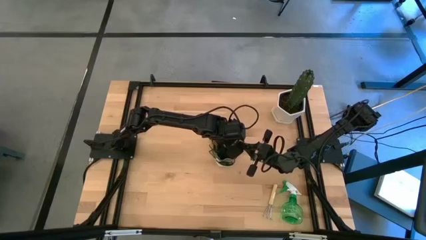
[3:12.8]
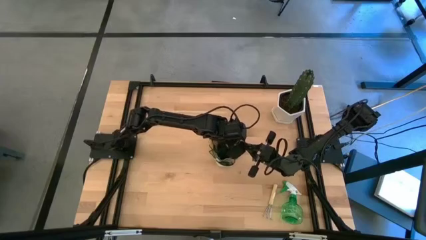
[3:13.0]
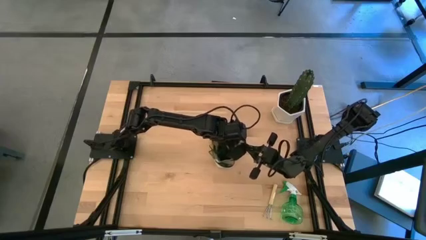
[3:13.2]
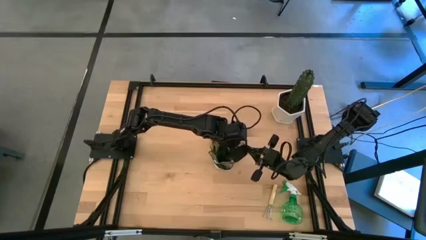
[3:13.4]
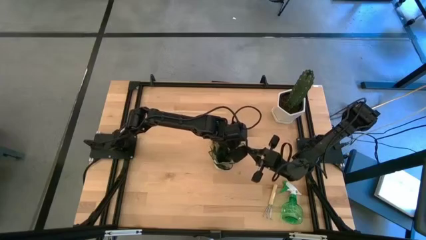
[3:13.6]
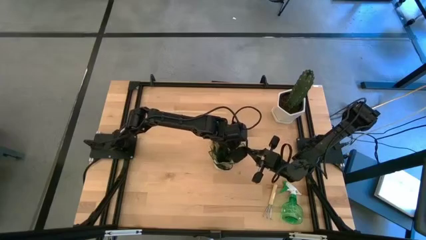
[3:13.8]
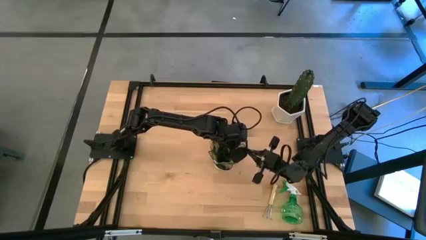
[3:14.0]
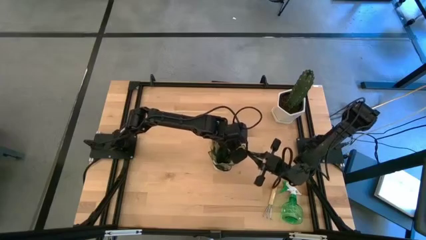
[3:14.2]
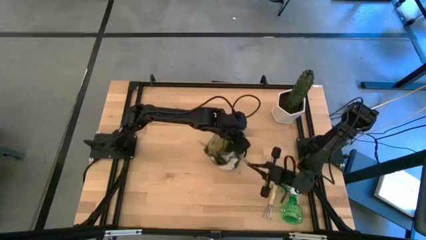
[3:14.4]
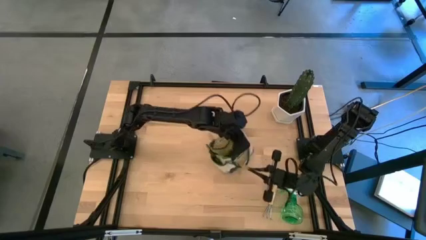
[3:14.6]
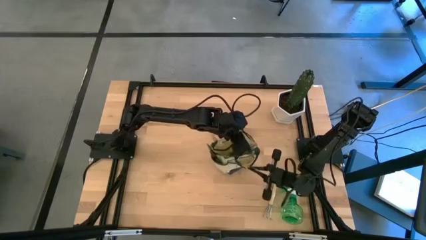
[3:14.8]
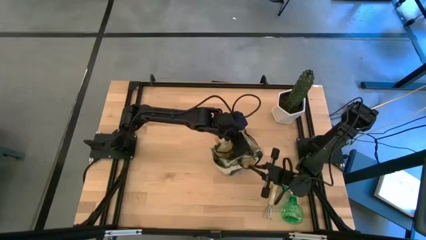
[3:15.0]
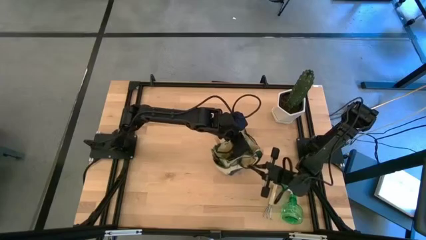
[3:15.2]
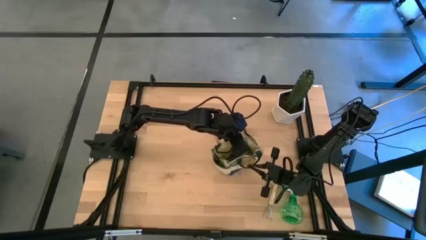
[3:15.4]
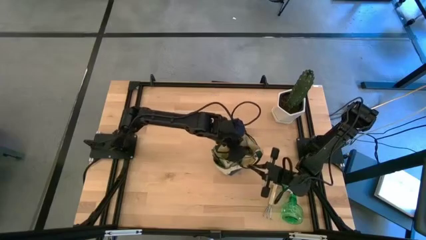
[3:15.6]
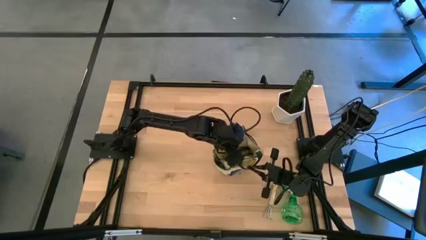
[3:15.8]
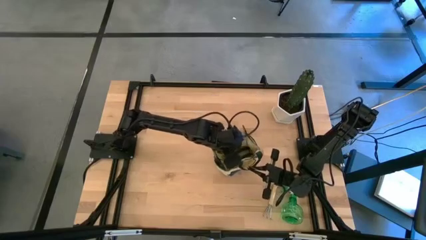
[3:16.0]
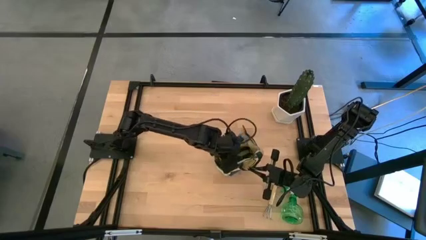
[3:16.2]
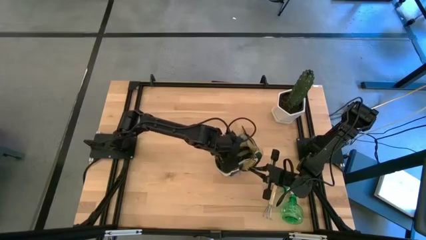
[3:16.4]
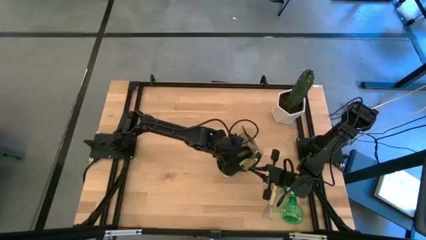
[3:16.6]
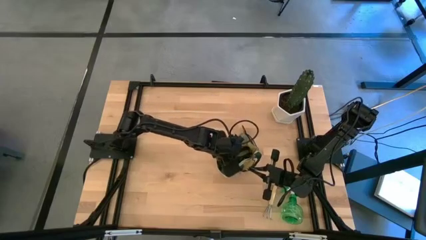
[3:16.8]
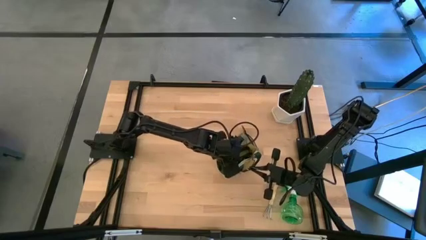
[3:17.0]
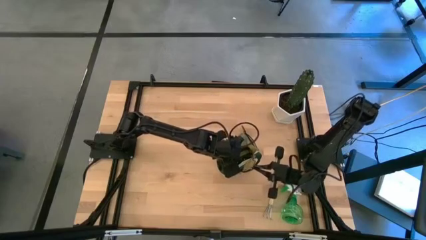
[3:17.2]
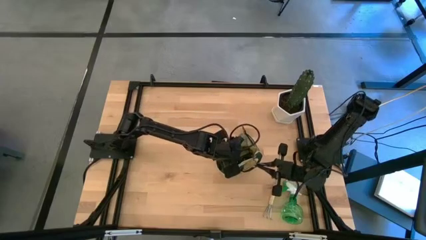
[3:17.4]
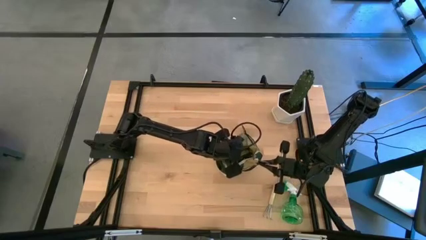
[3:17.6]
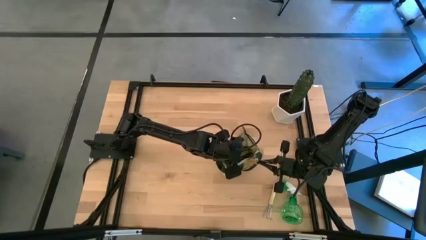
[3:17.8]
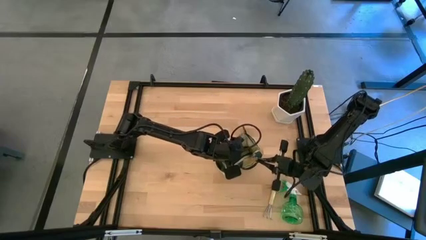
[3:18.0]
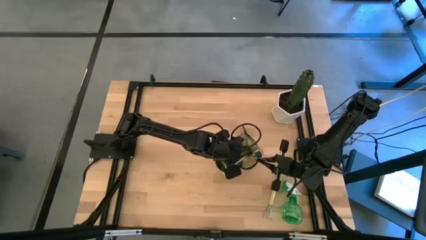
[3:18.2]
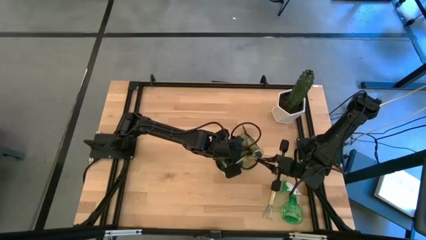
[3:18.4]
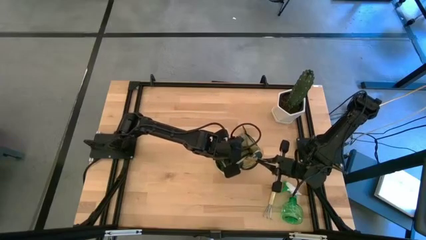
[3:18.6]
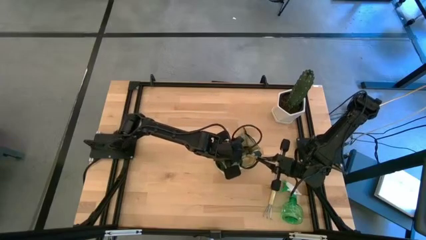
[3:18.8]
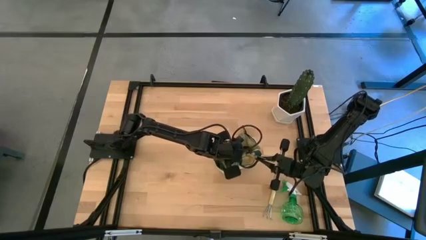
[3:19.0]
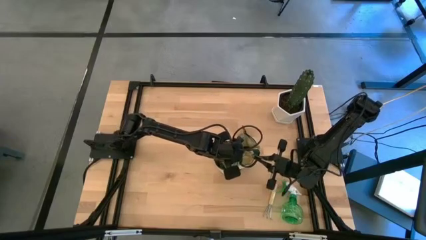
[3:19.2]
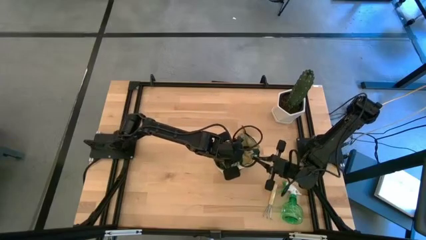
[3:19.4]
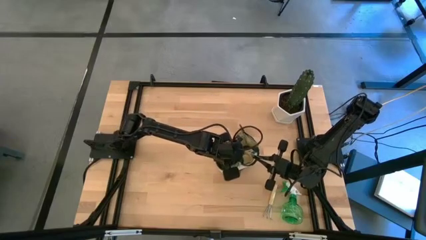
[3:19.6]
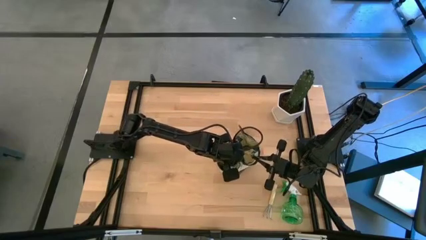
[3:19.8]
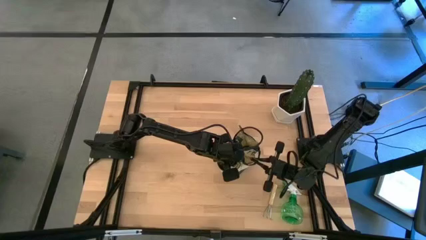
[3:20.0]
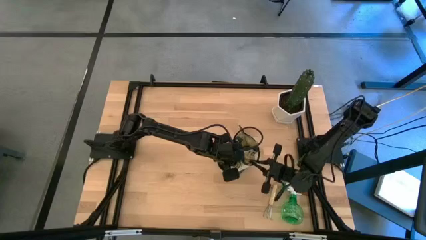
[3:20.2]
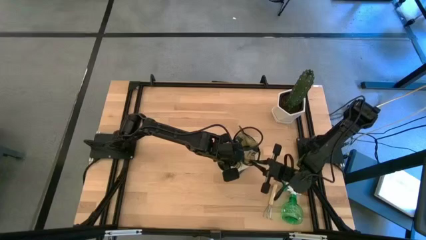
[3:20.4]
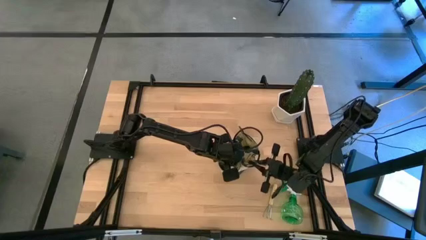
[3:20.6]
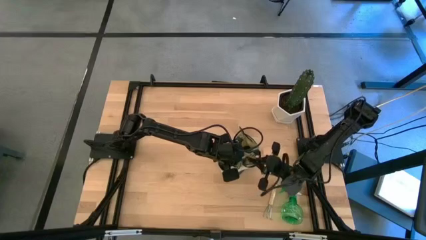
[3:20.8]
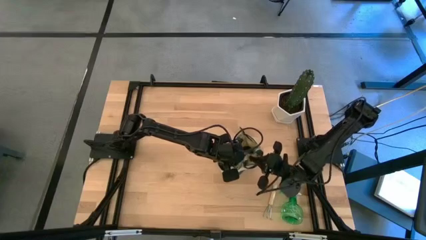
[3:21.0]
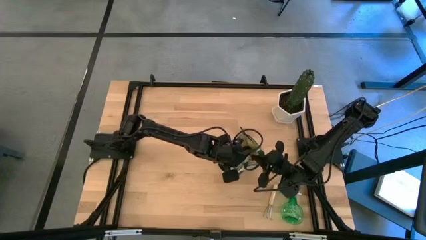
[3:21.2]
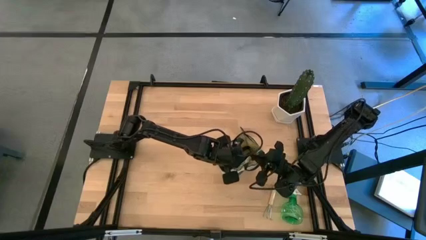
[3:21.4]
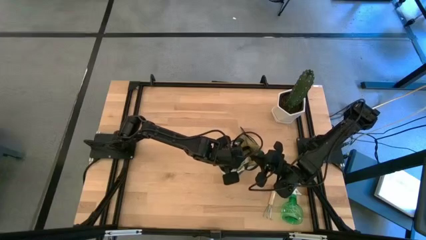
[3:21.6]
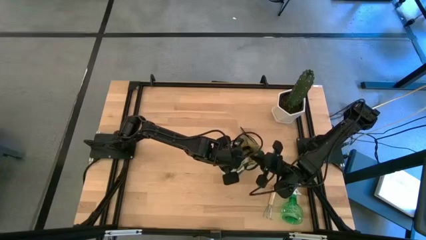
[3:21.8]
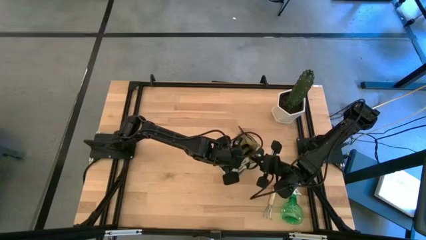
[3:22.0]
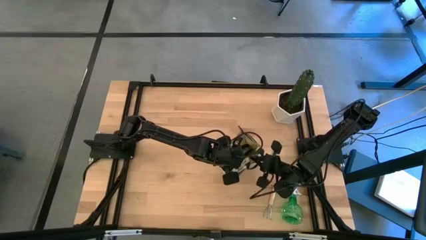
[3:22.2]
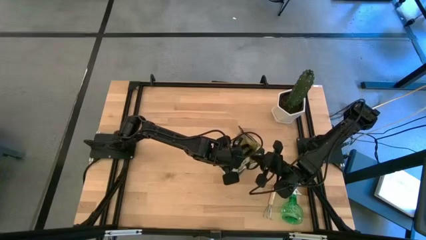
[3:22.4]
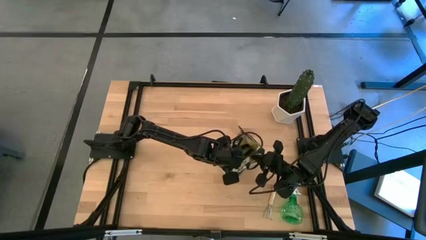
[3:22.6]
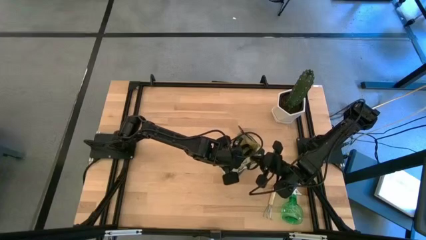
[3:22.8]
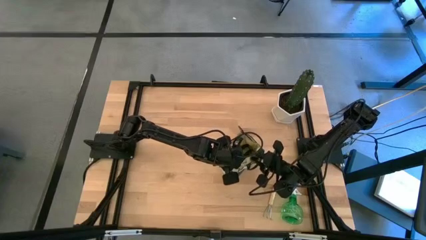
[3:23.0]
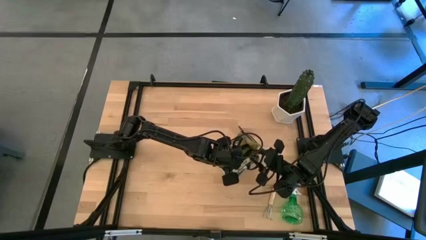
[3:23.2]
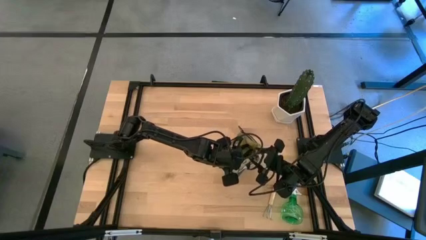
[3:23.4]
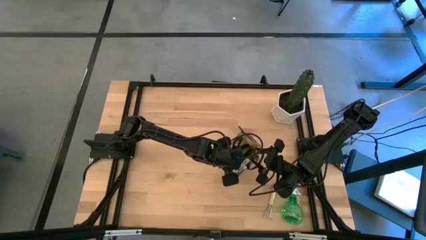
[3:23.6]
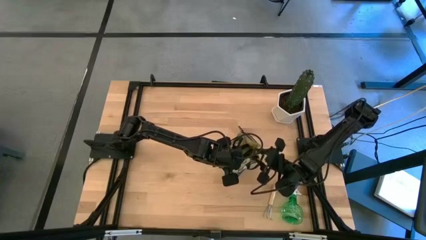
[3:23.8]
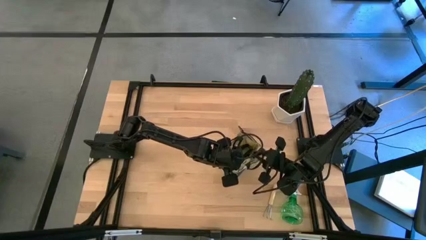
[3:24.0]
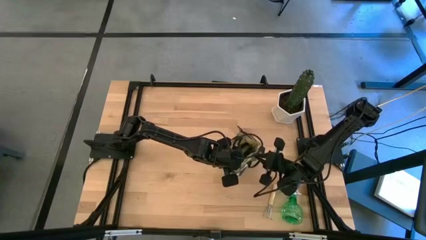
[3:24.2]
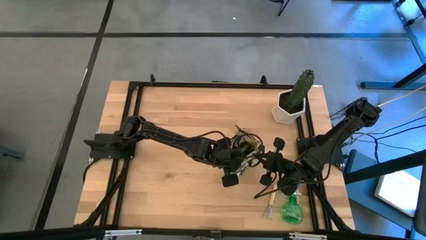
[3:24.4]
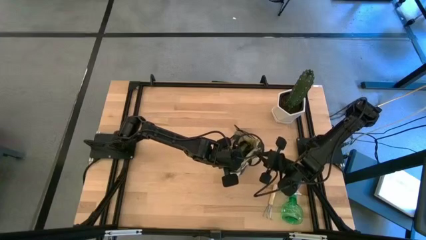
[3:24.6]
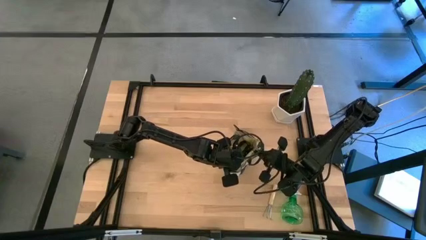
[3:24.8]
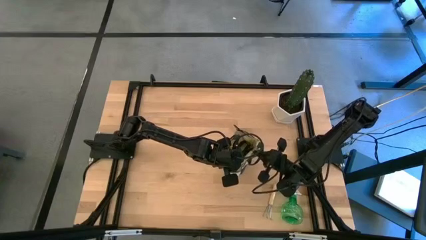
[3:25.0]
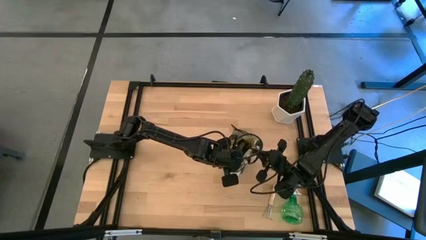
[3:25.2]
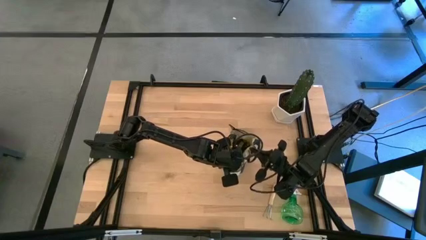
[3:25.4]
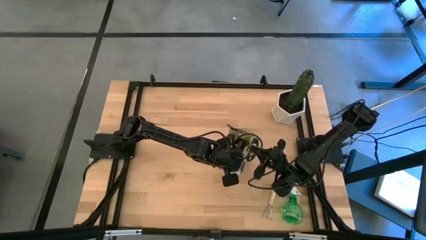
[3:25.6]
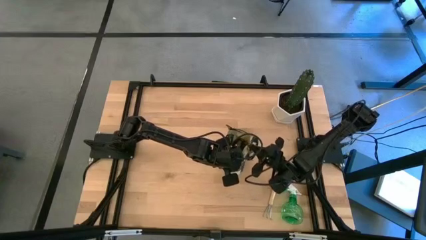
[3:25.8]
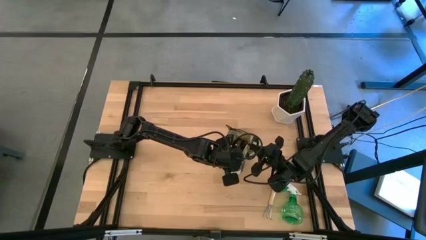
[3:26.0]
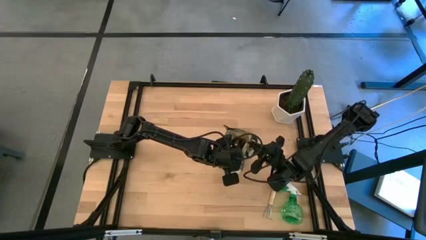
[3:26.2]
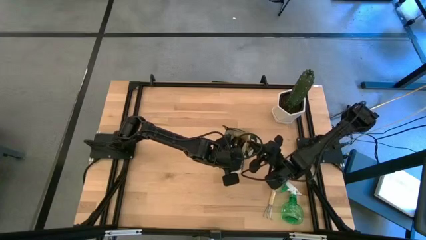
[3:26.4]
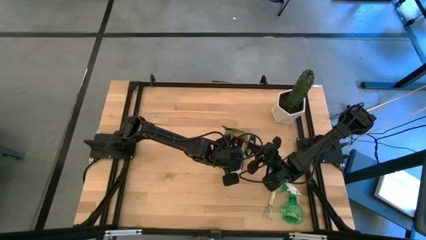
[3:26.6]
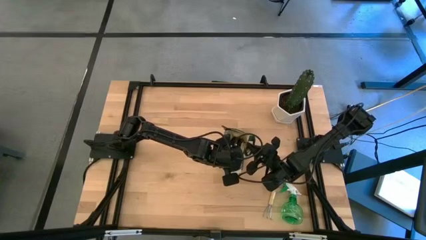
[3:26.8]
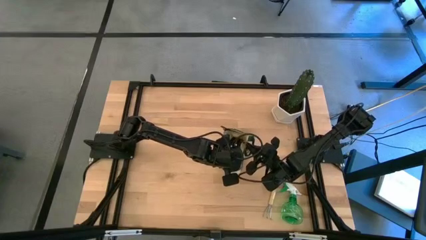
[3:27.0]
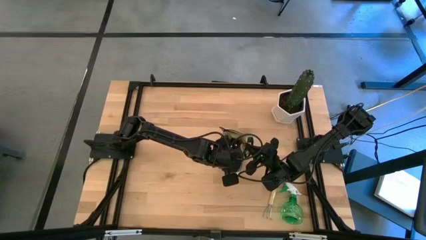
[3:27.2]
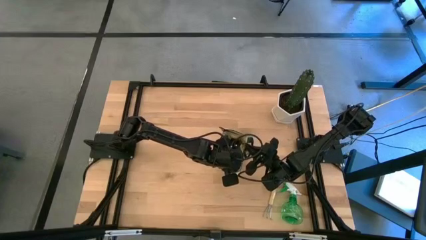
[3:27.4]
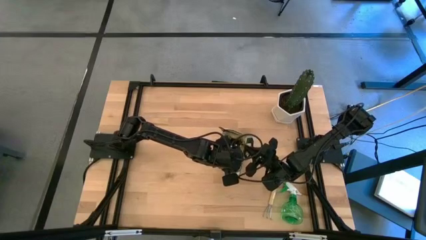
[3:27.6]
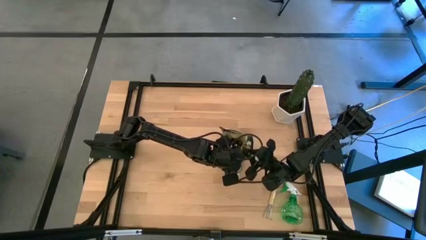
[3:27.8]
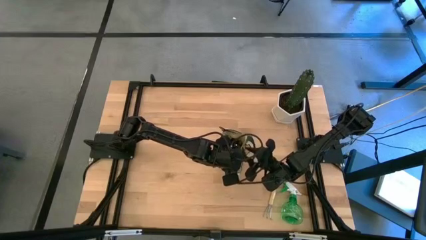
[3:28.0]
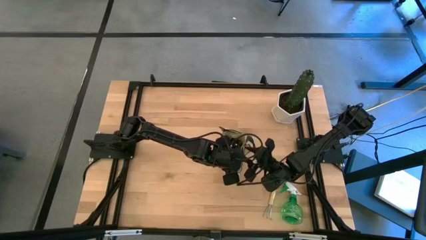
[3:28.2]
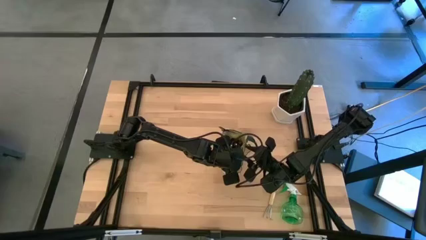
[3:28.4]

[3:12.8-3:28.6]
Task: Pick & Place Garden tools in Gardening bag
Put the brown trowel into the green gardening bag
